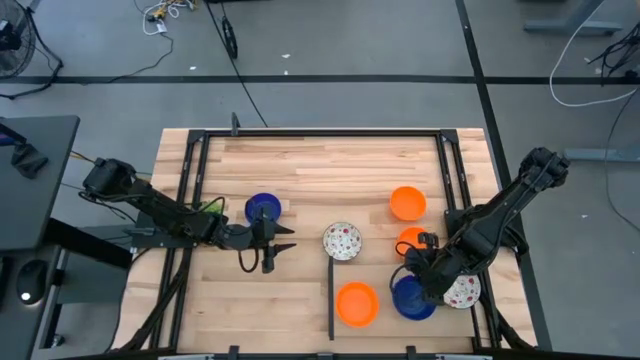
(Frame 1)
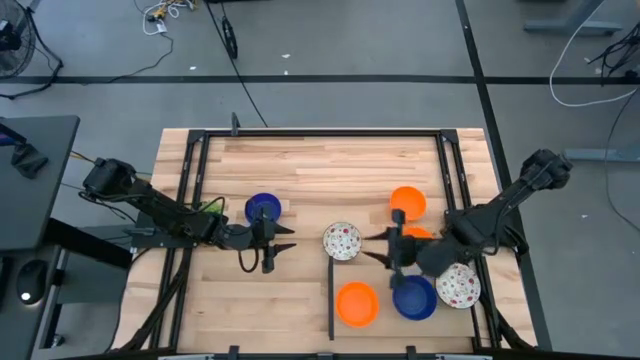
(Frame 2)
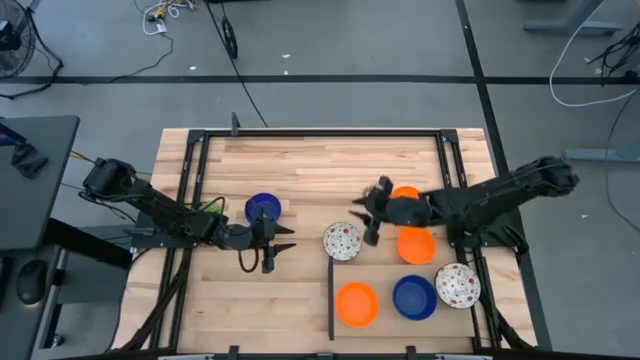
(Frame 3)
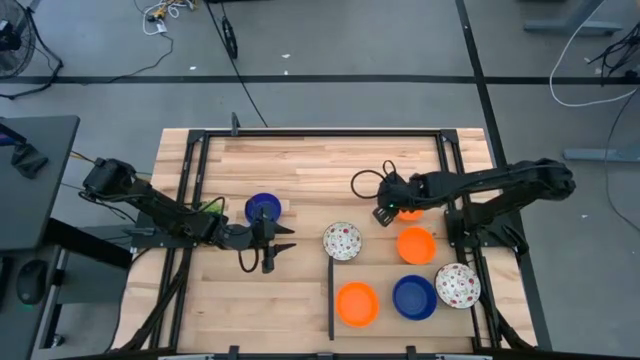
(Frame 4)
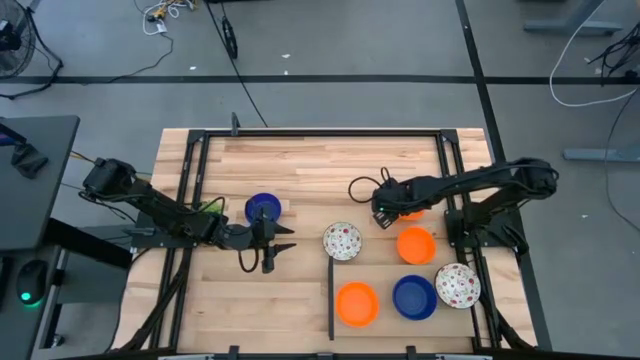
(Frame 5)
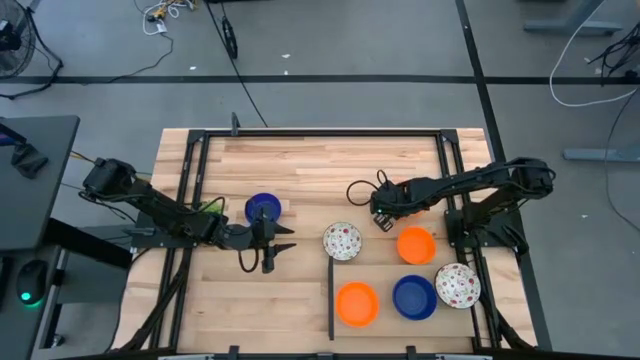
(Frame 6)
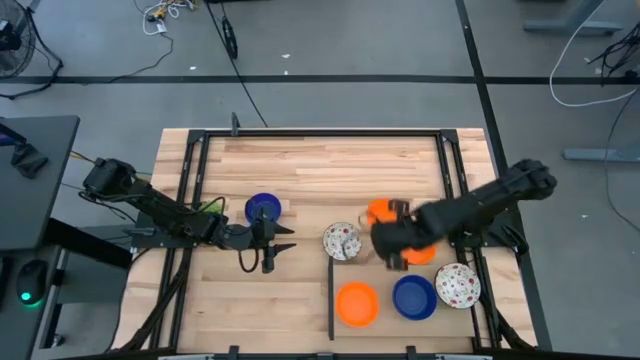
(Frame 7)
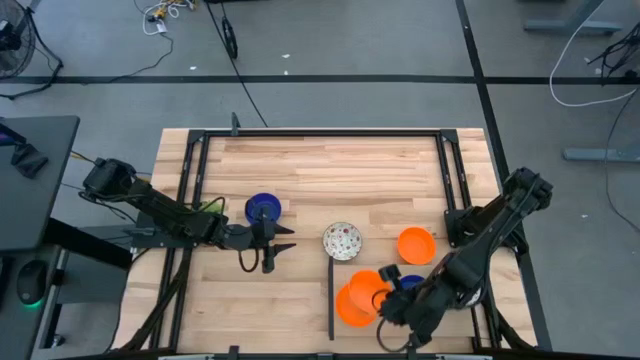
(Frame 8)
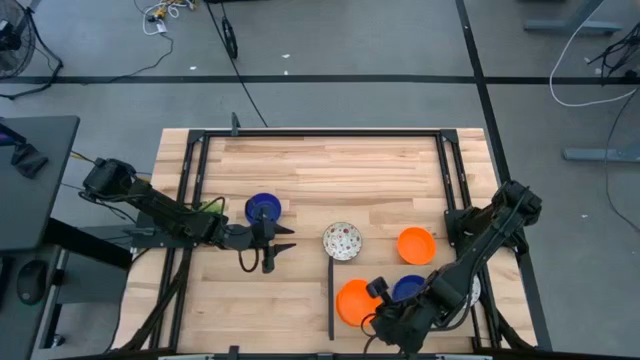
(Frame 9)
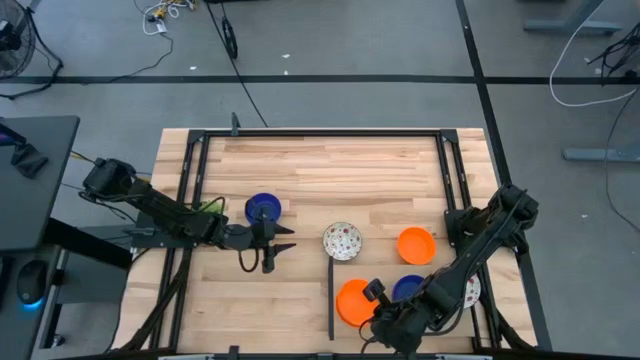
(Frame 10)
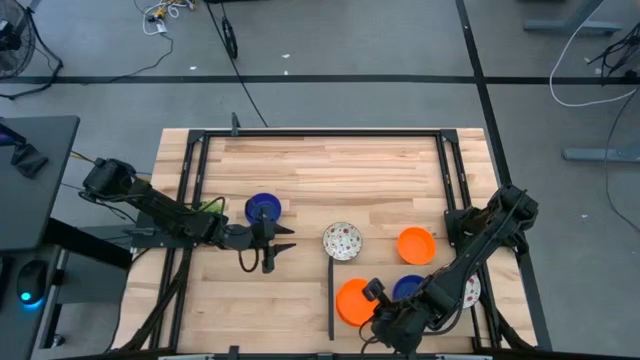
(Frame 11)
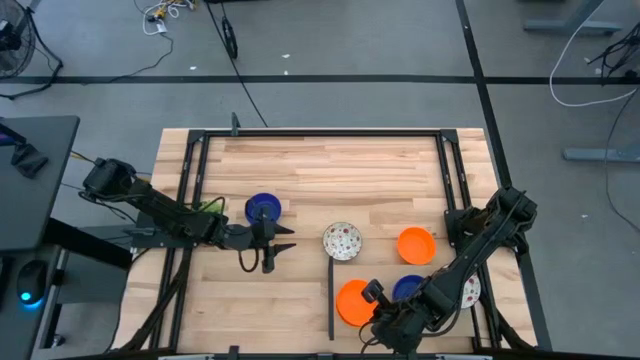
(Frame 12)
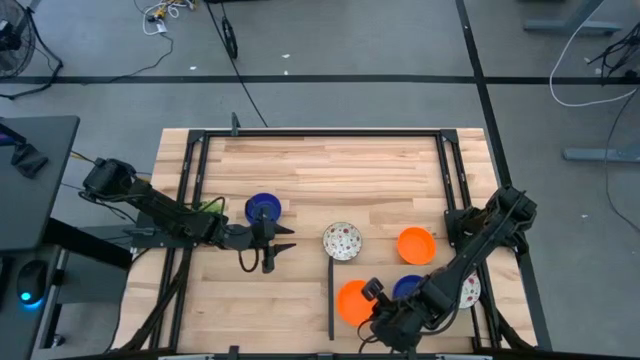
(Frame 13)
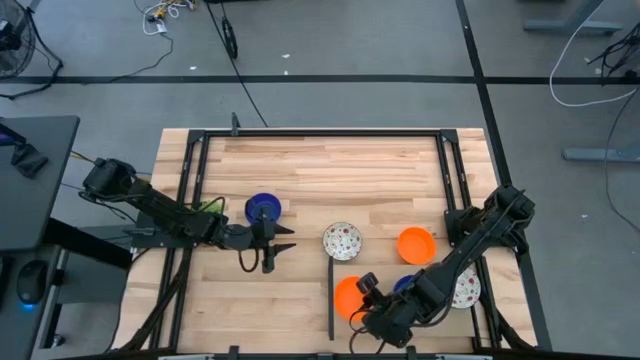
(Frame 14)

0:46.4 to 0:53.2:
Task: Pick & Place Mini bowls
Stack the orange bowl on the orange bowl on the shelf

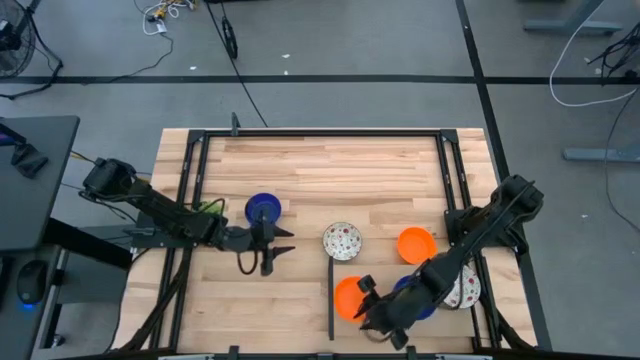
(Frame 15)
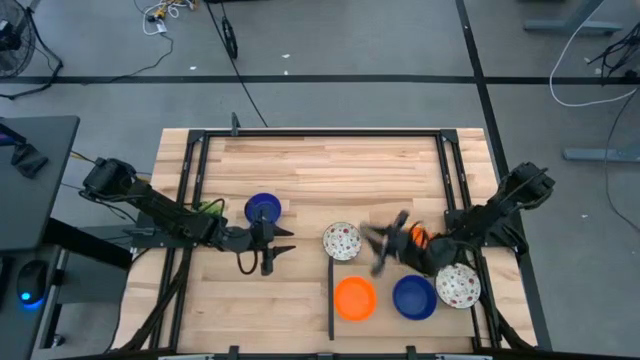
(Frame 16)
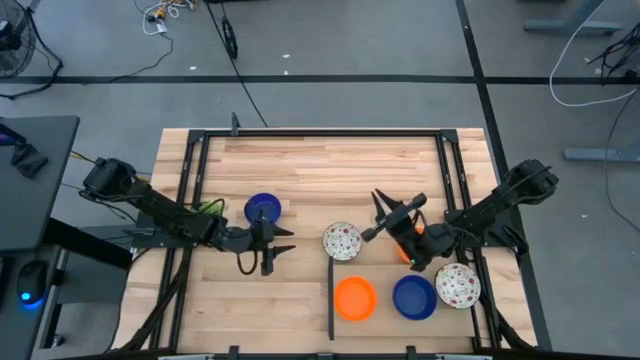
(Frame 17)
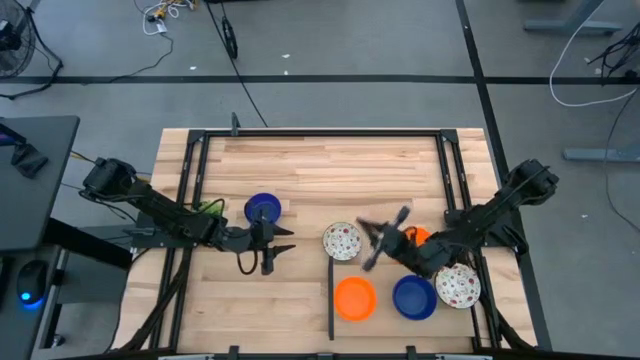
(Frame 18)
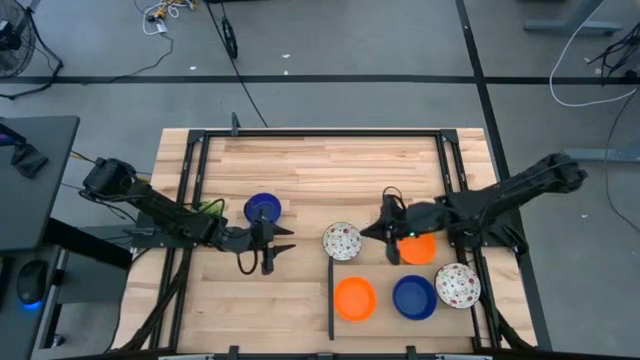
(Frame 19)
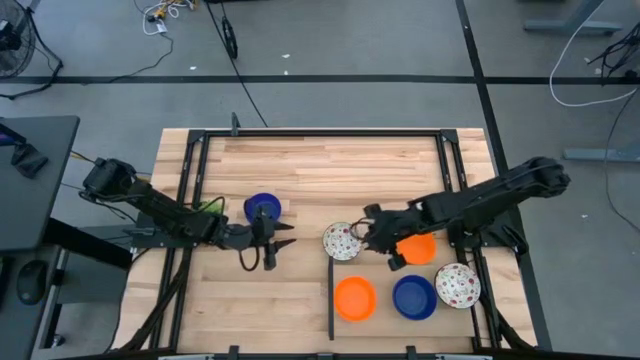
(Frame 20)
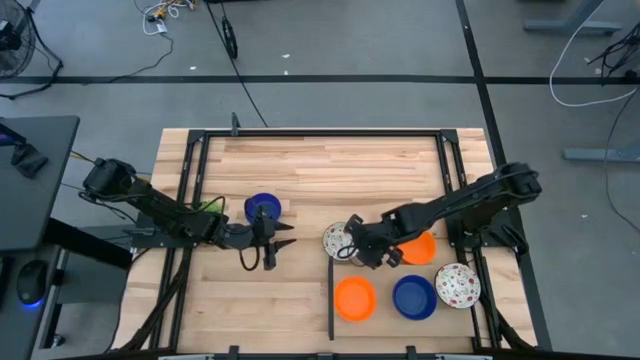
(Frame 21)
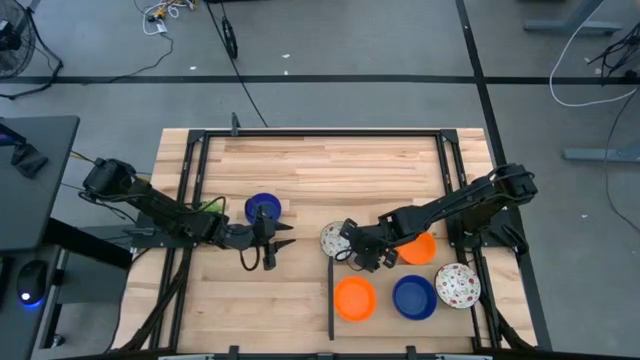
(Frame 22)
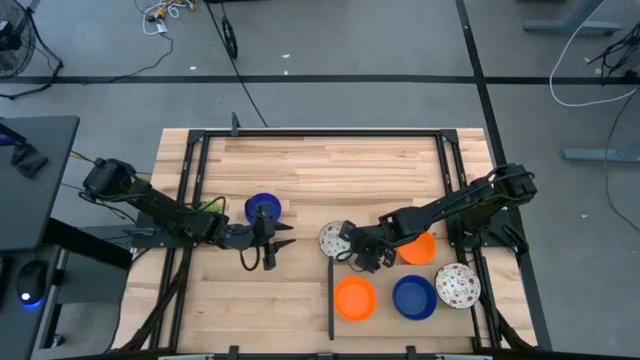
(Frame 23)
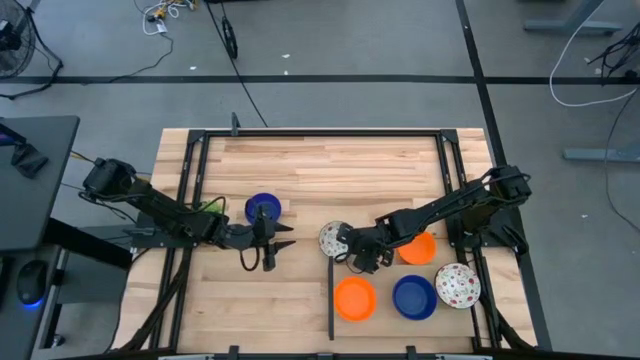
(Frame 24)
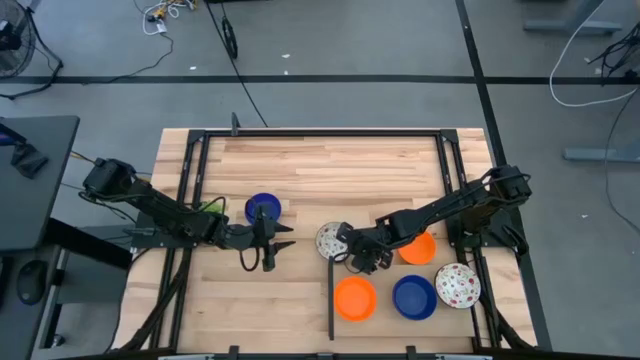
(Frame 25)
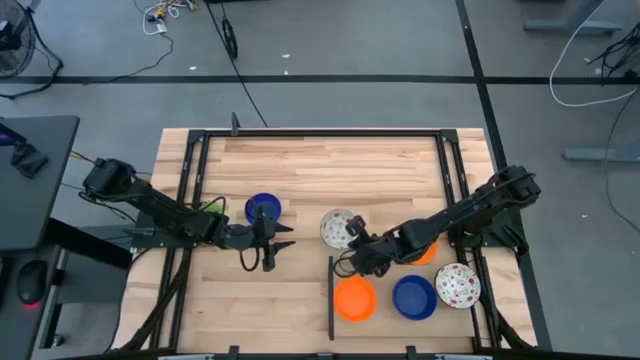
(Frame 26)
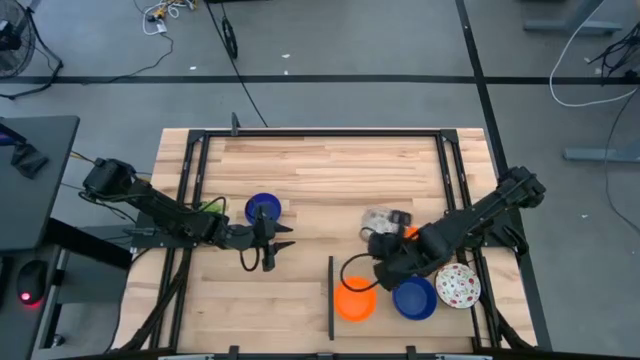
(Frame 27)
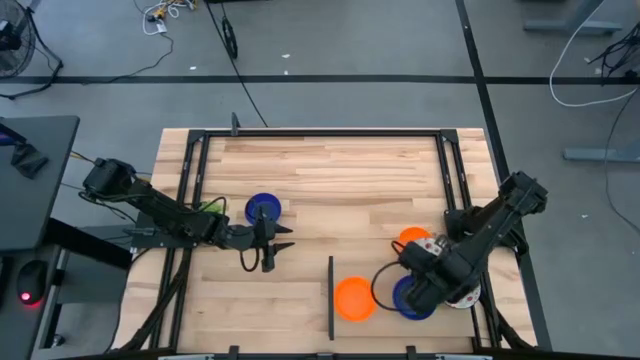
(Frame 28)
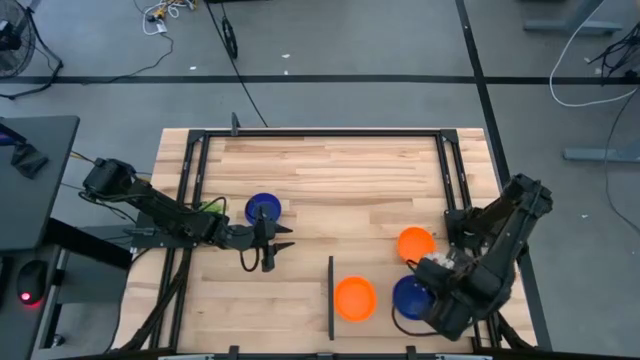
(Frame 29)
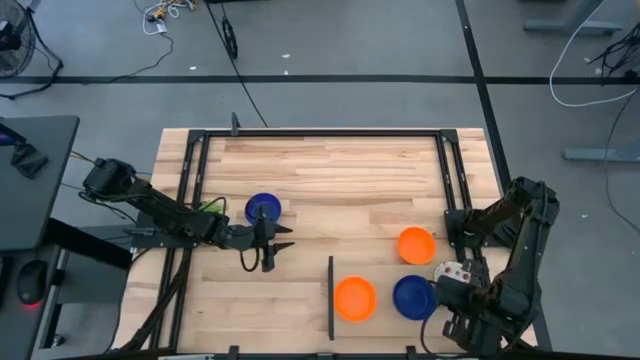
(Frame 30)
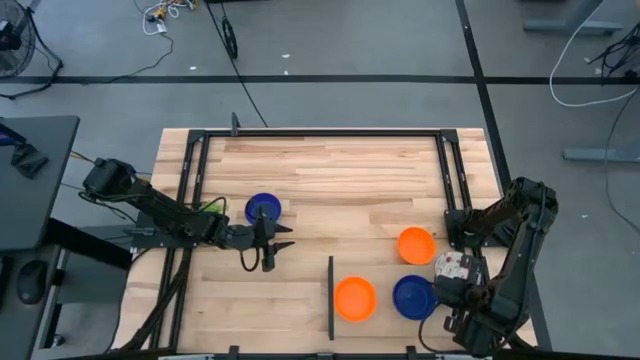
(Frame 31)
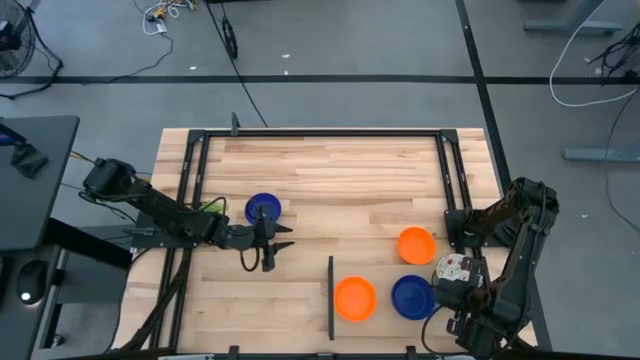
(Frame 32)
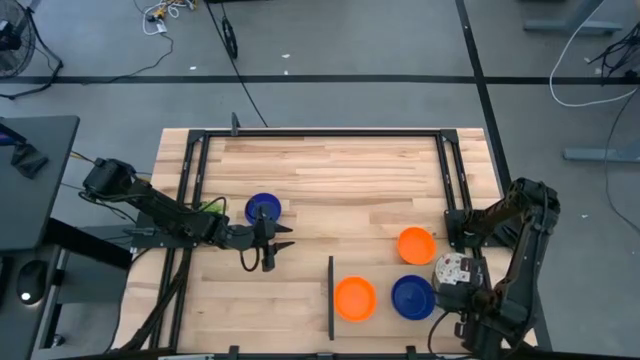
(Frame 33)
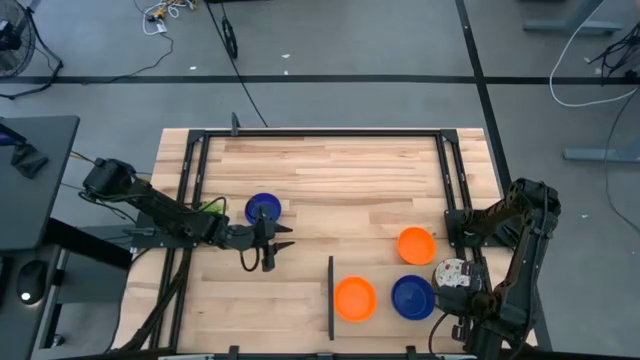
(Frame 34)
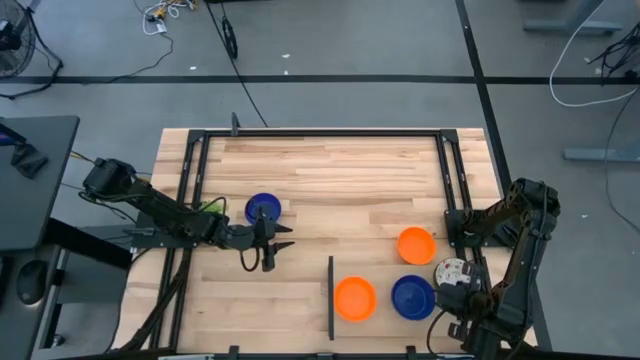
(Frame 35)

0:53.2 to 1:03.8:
Stack the white bowl on the white bowl on the shelf

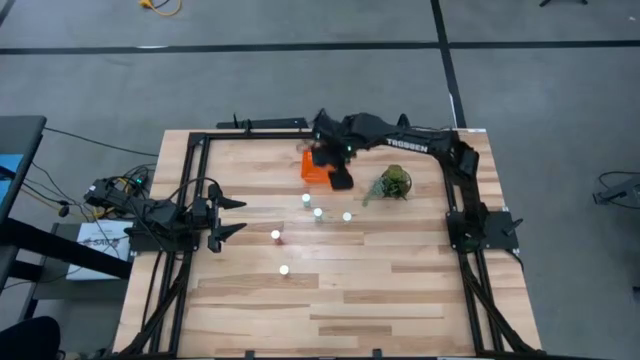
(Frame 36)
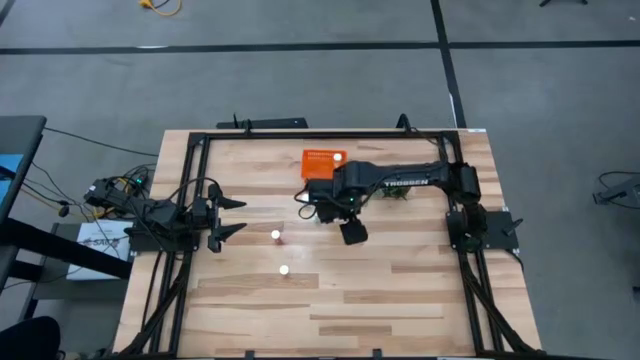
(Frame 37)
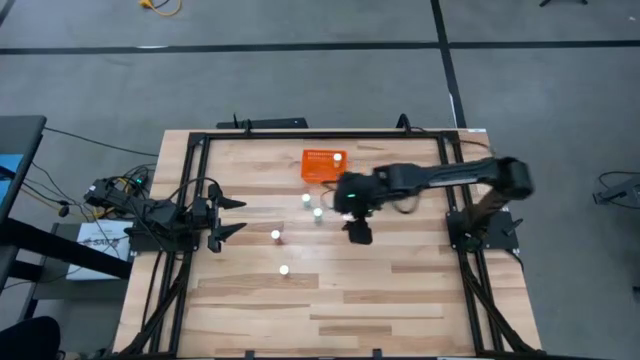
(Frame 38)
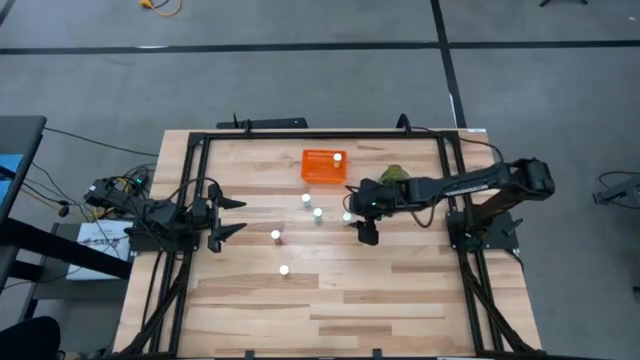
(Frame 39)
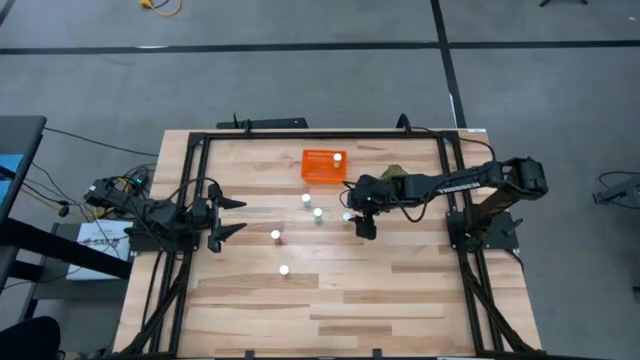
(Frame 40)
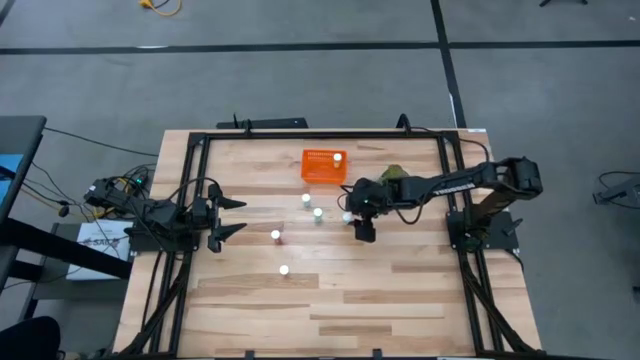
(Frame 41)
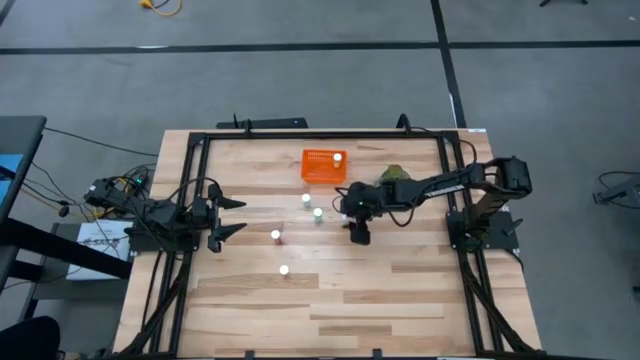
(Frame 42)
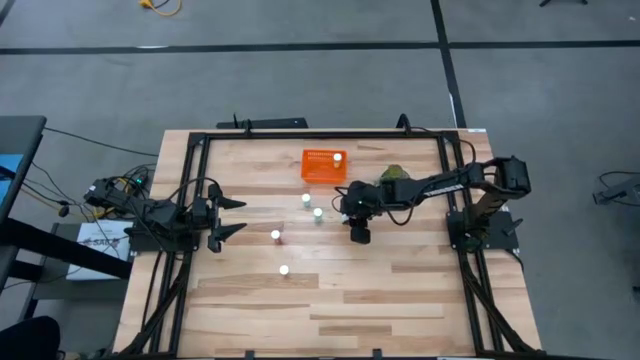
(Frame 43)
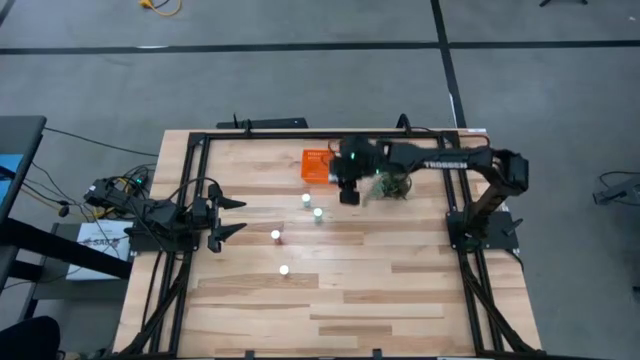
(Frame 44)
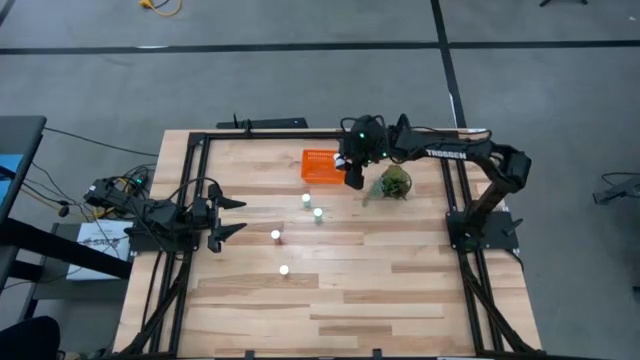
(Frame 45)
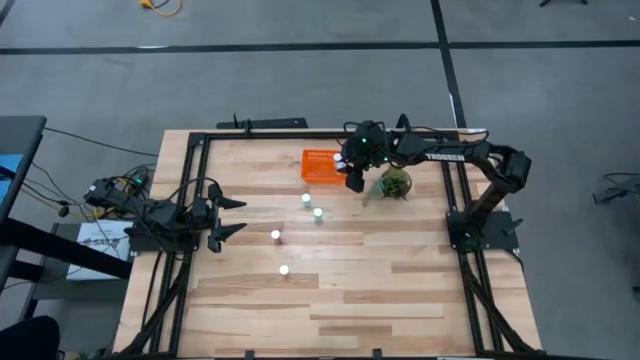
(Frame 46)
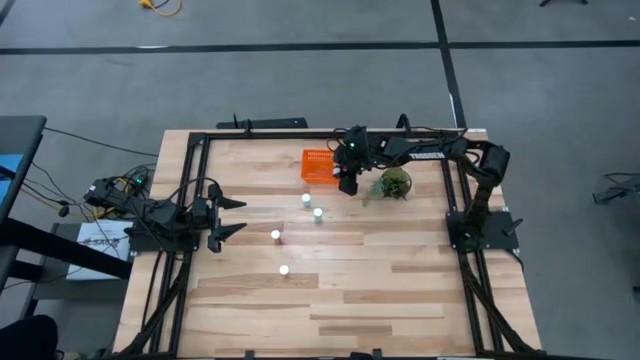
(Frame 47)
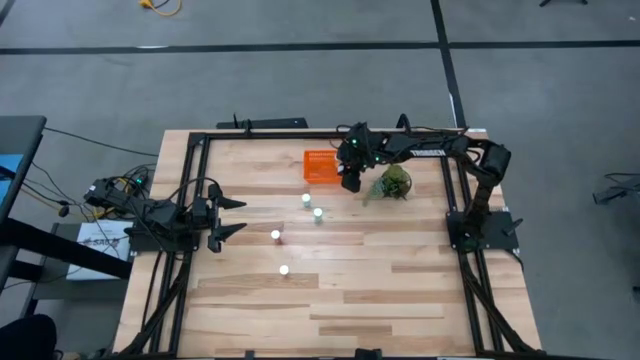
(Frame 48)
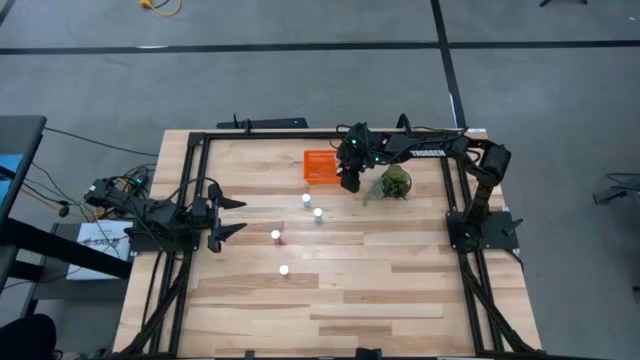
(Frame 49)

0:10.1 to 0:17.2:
Task: Pick and place pill bottles into a basket
Put the top yellow pill bottle into the orange bin
